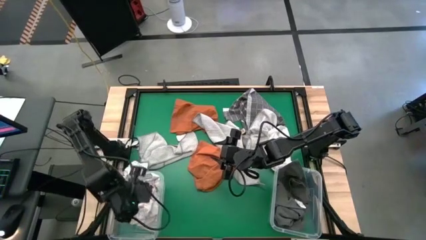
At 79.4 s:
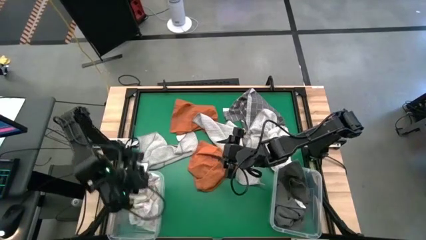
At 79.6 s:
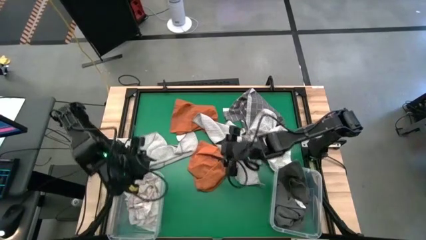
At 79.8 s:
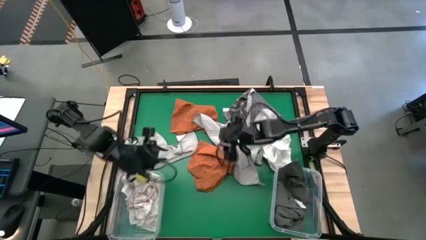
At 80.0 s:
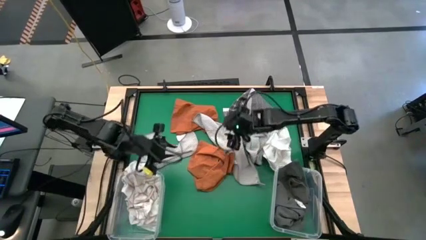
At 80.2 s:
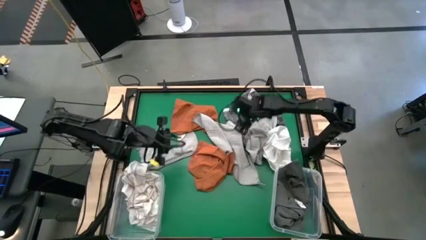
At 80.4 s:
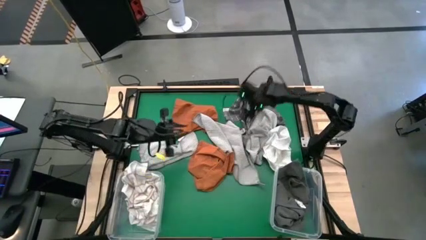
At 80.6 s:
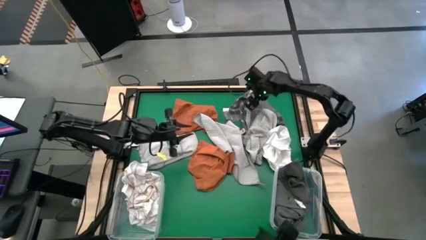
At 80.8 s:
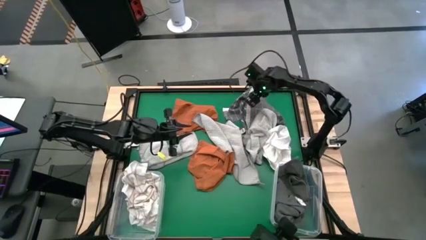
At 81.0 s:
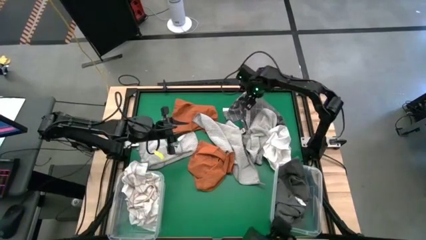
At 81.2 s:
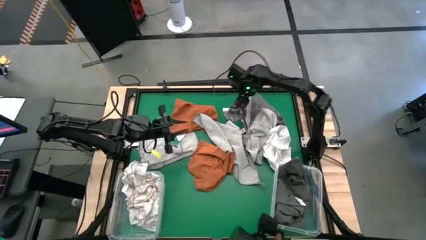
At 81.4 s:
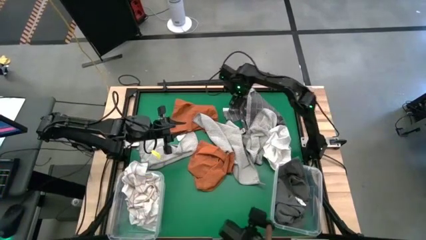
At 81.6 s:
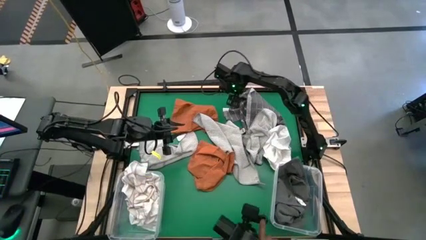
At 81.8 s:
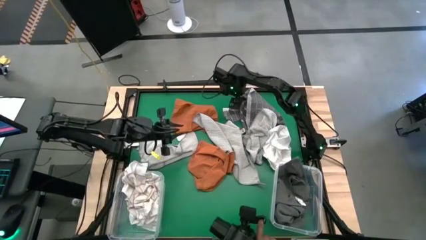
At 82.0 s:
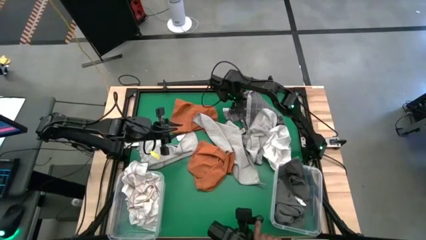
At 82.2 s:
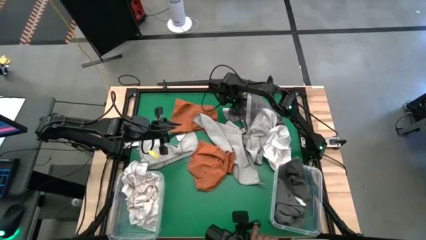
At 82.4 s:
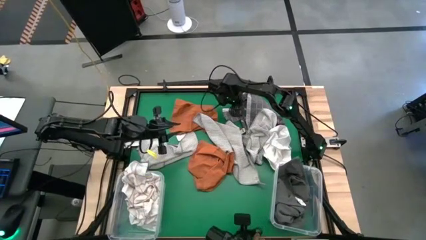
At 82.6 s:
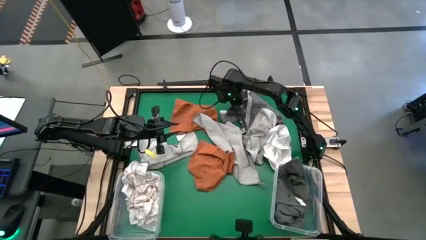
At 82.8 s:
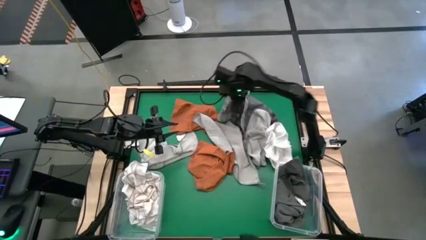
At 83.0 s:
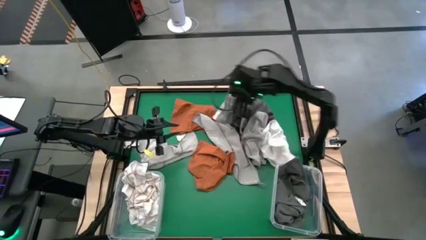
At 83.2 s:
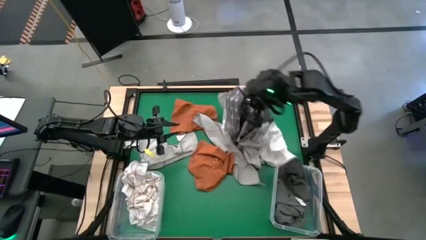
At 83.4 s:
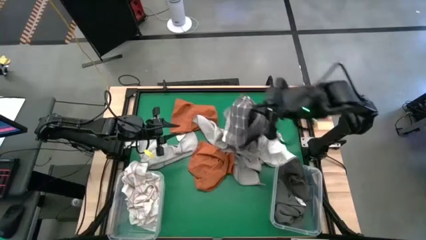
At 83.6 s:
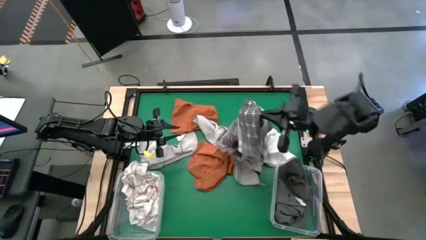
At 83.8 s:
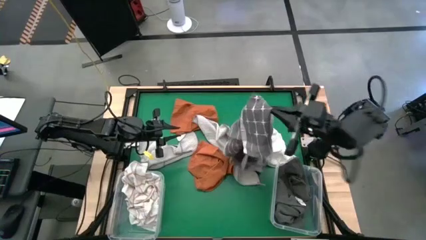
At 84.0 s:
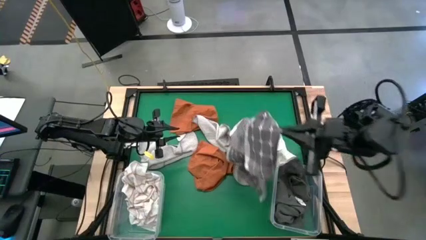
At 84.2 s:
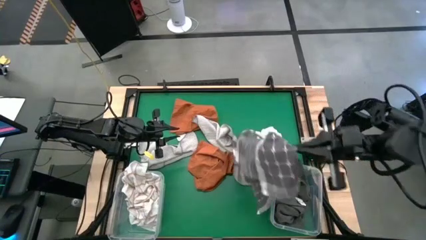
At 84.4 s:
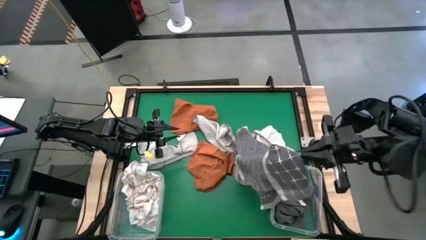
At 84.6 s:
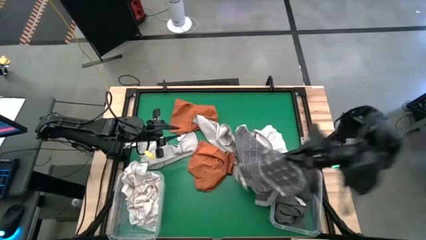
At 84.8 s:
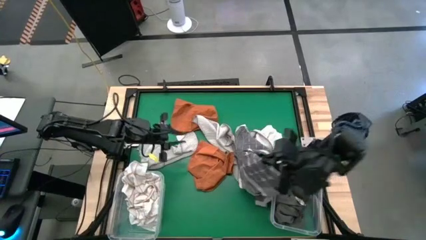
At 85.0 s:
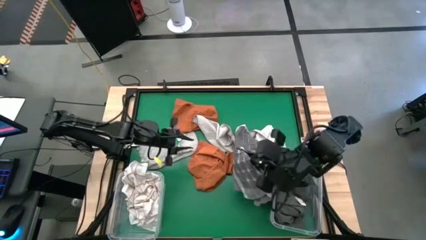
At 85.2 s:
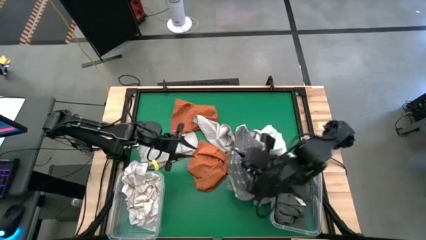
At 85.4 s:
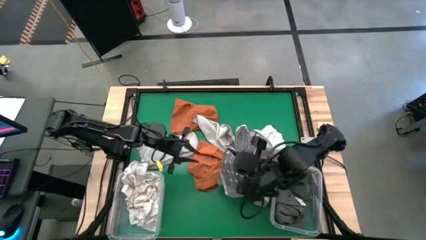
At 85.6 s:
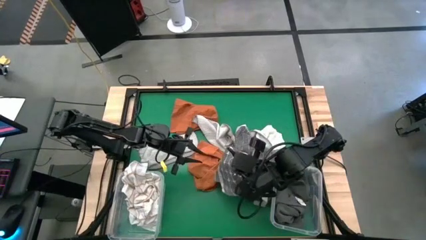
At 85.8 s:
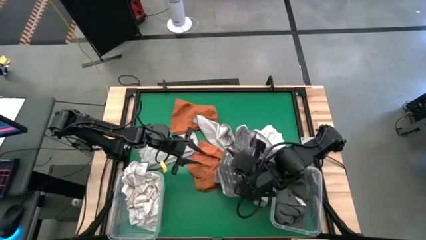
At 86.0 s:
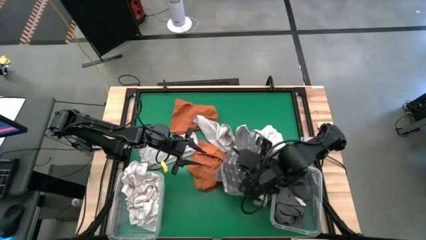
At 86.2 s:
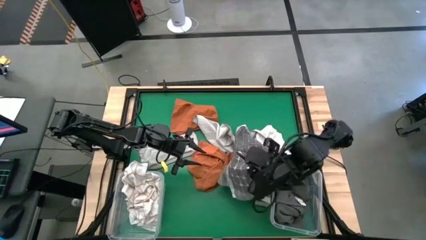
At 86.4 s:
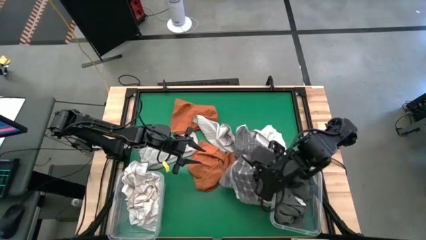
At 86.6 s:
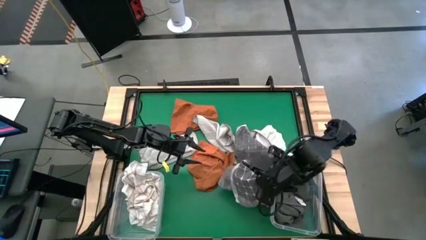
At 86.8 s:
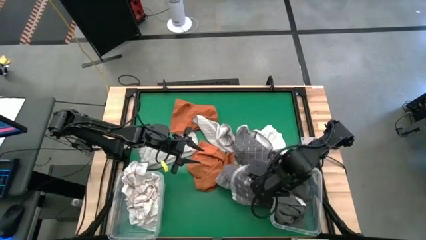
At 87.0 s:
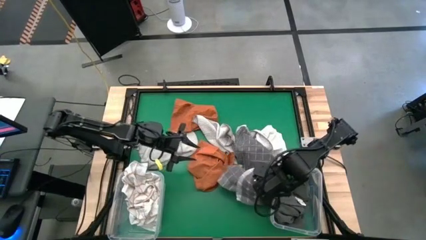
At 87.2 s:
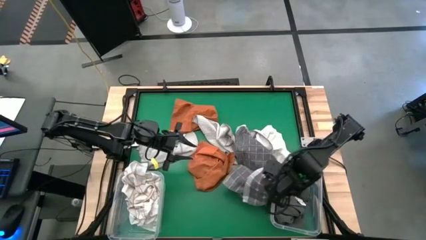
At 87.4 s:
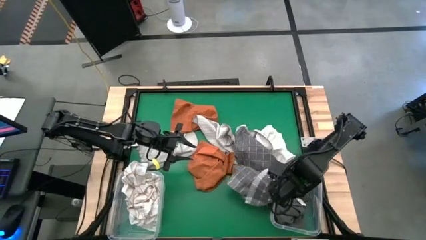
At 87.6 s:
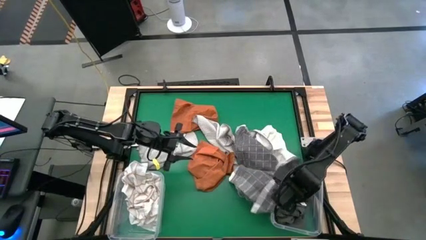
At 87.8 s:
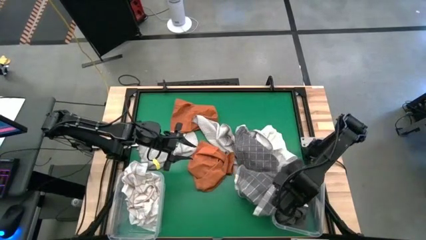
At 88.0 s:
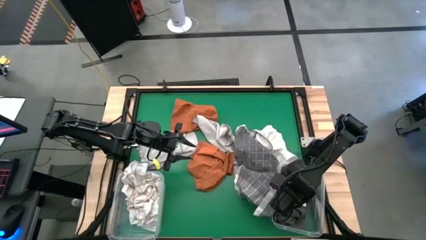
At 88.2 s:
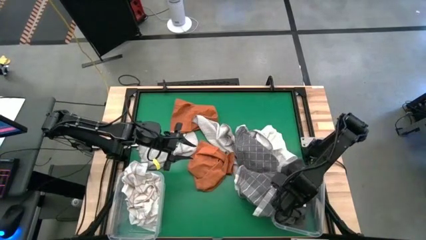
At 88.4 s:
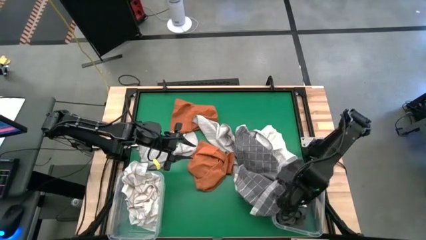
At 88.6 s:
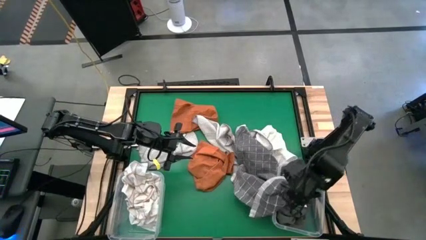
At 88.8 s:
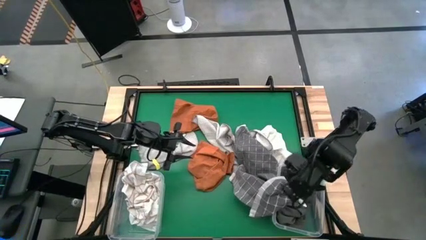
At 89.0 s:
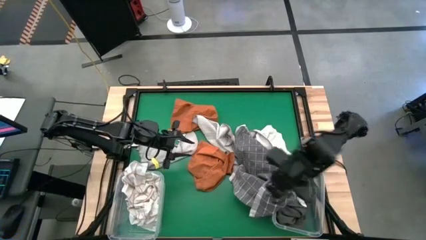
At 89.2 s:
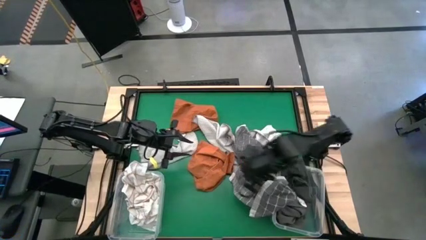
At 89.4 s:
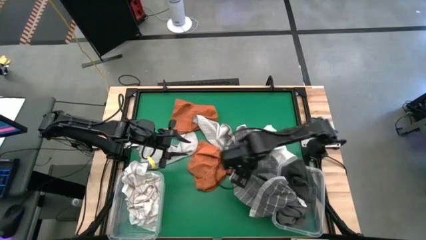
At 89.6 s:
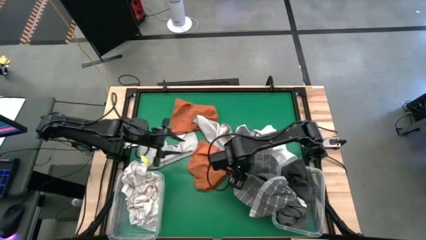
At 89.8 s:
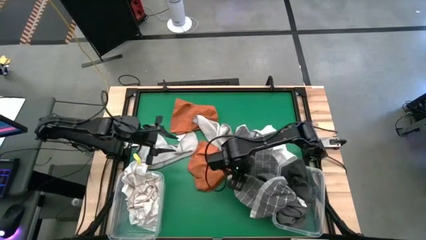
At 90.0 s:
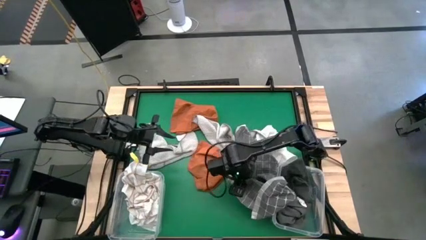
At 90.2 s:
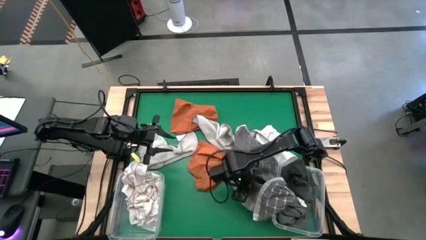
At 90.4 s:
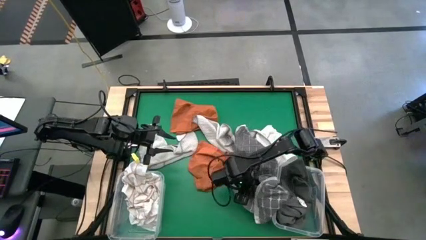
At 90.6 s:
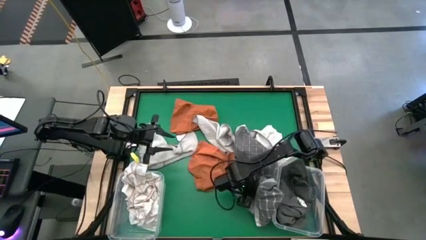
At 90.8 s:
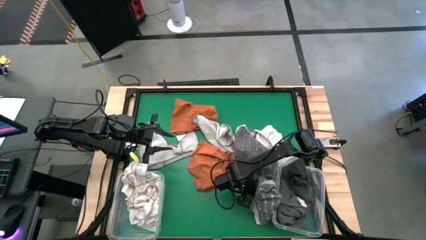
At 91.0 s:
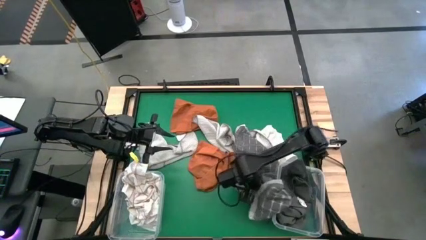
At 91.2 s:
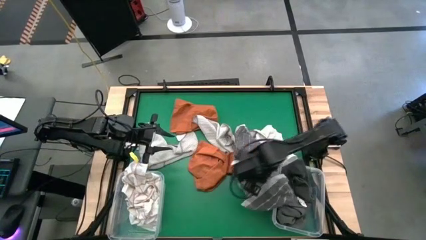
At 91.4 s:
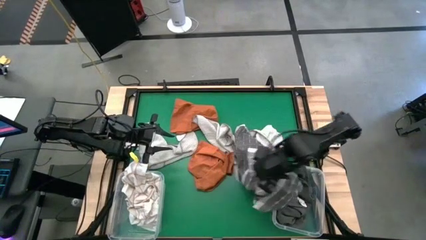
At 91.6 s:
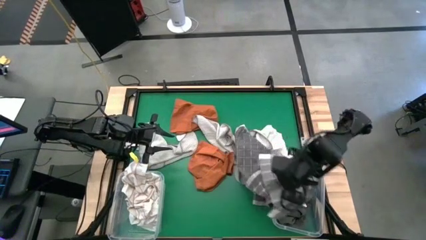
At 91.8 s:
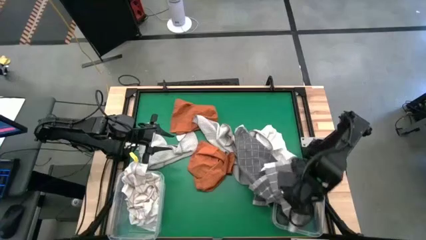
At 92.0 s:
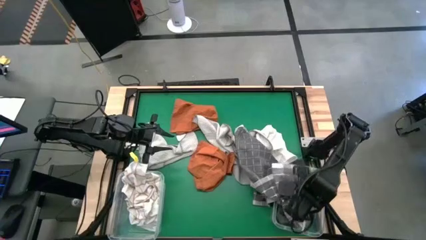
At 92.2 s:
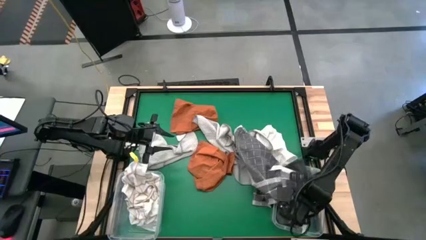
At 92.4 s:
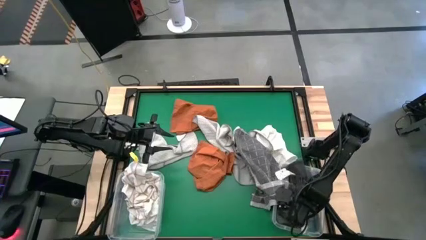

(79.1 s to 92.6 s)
Task: Sort towels by color in basket
Put the gray squared towel into the right transparent bin

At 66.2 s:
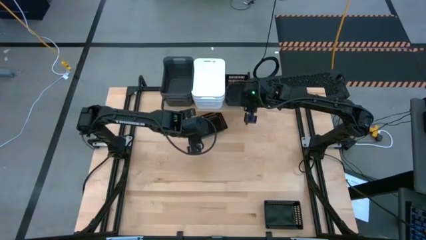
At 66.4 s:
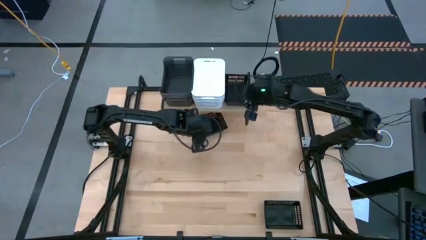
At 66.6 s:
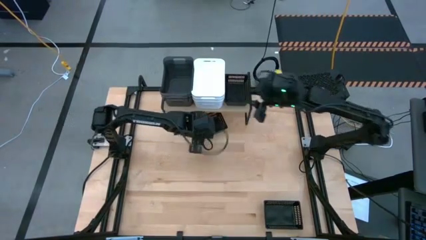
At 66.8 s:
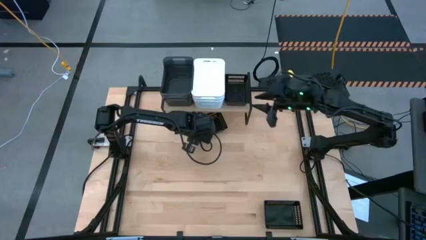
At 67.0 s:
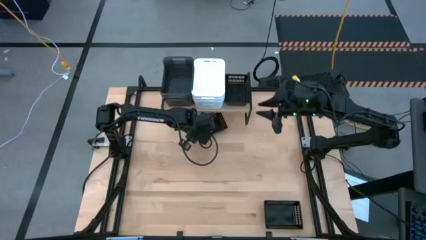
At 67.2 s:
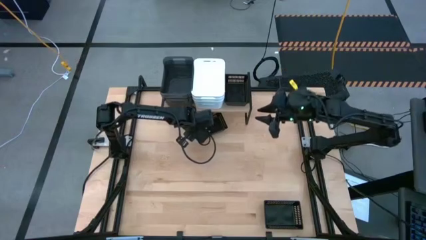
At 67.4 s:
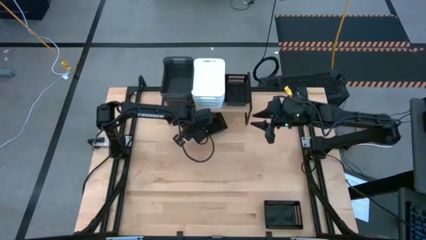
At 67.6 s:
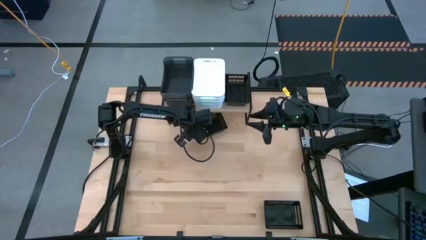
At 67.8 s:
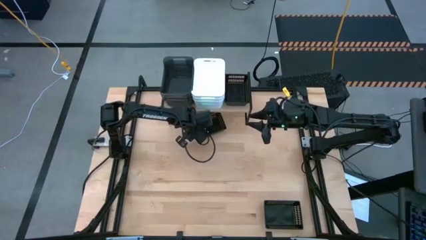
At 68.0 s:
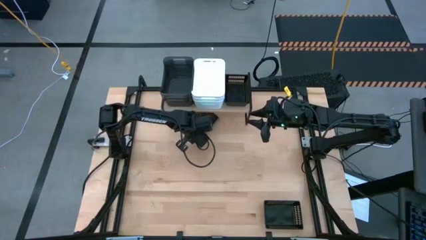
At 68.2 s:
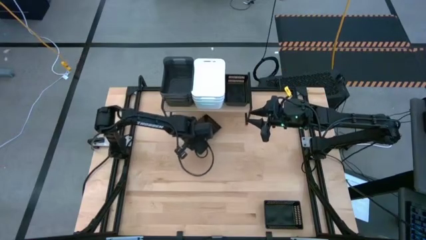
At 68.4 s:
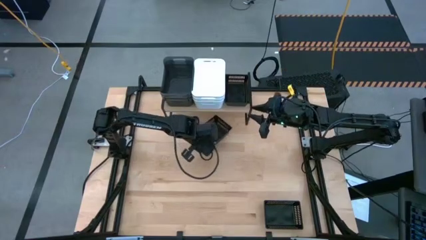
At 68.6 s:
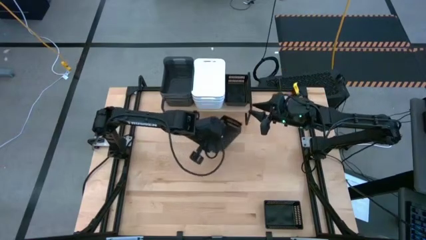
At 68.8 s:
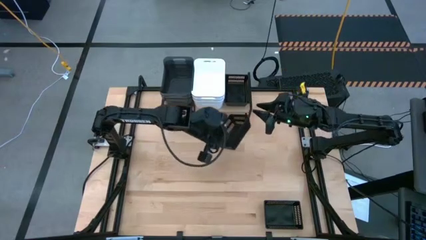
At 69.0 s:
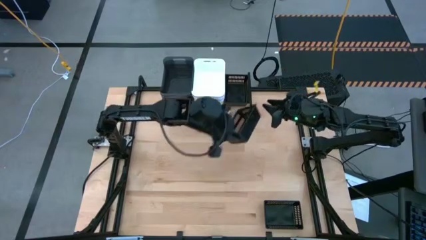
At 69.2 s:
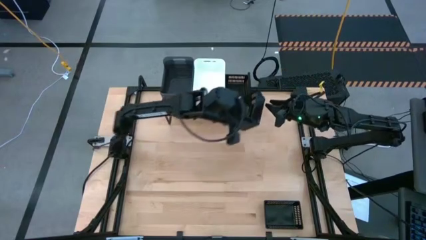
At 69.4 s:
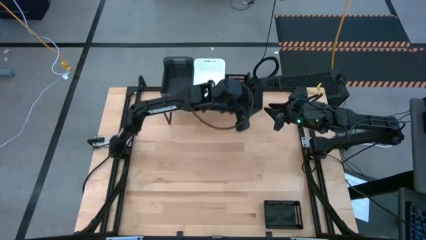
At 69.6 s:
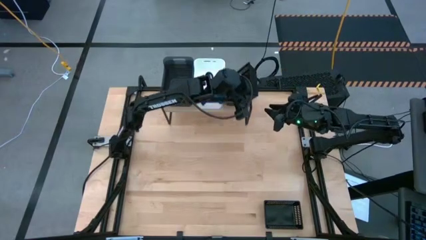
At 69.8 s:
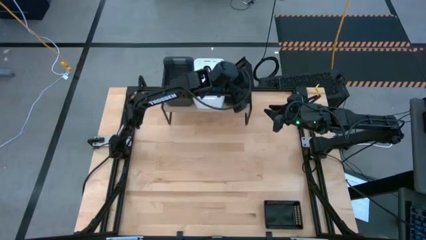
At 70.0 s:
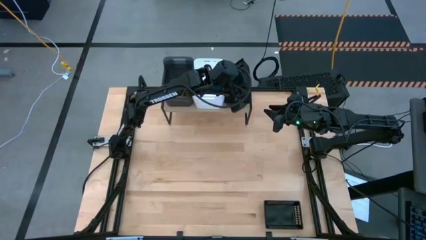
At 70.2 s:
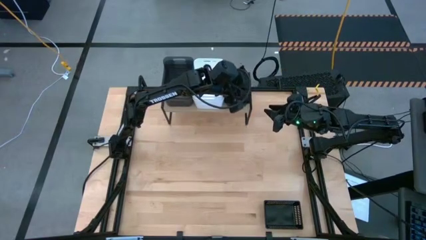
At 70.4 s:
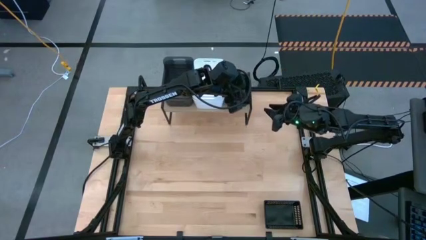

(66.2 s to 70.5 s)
Task: Stack baskets on shelf by color
Stack the top black bin on top of the black bin on the shelf
